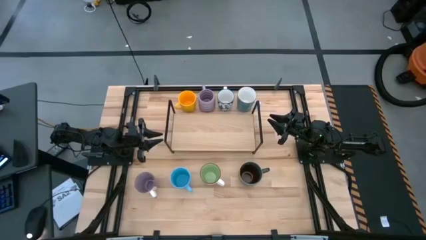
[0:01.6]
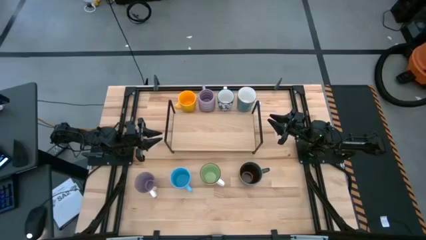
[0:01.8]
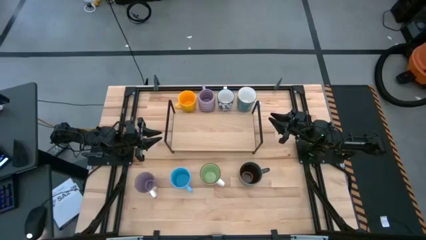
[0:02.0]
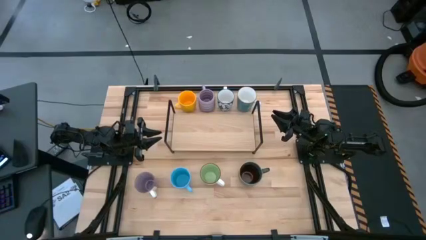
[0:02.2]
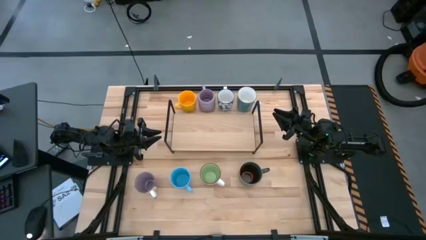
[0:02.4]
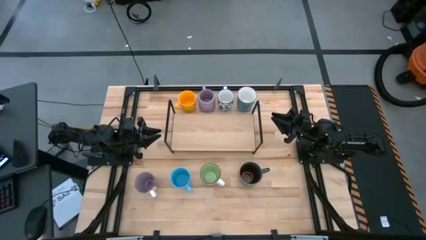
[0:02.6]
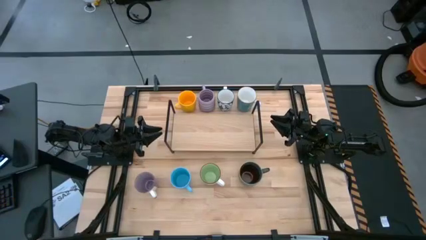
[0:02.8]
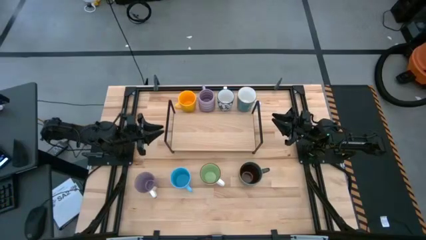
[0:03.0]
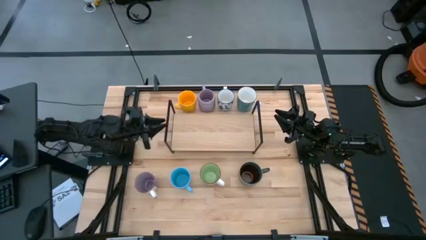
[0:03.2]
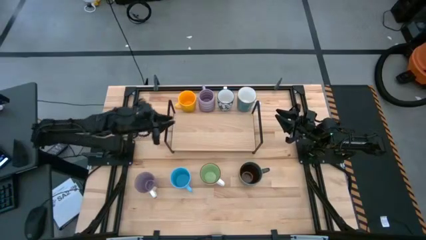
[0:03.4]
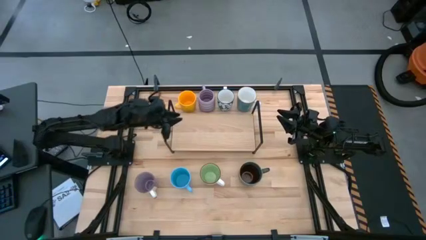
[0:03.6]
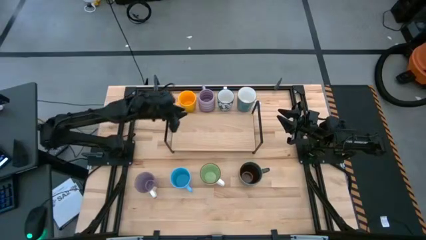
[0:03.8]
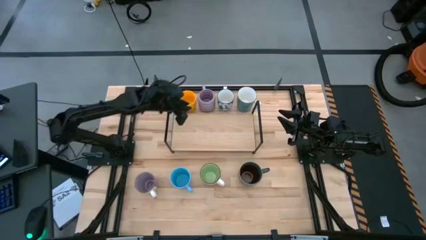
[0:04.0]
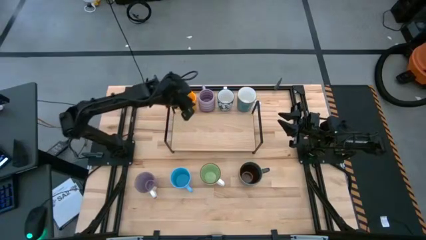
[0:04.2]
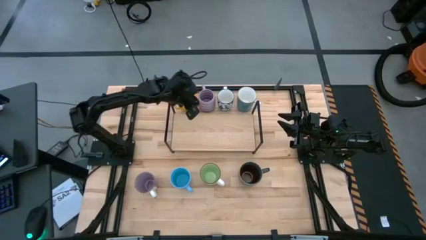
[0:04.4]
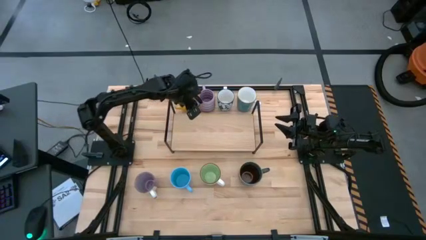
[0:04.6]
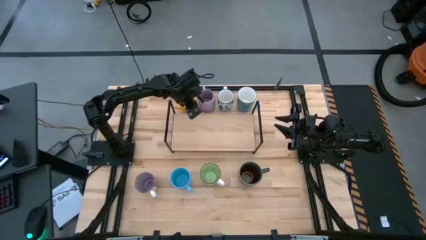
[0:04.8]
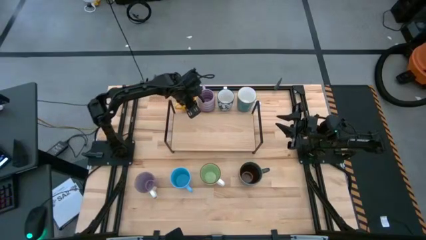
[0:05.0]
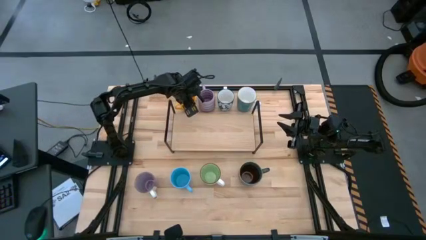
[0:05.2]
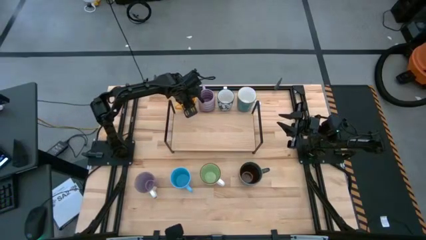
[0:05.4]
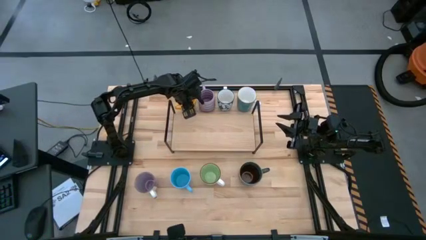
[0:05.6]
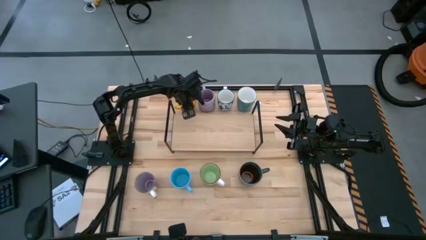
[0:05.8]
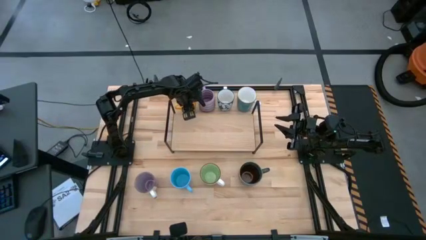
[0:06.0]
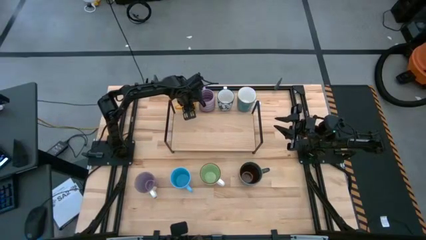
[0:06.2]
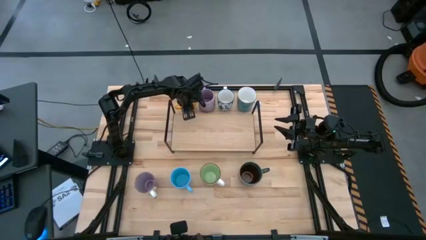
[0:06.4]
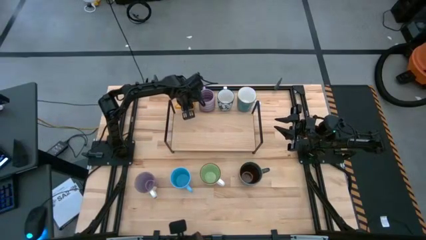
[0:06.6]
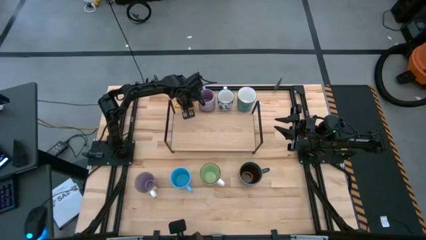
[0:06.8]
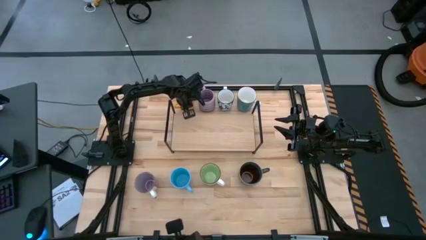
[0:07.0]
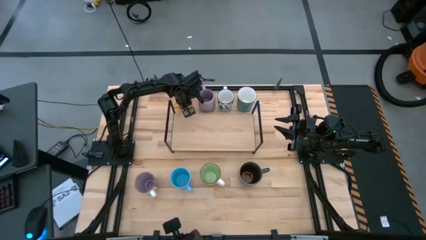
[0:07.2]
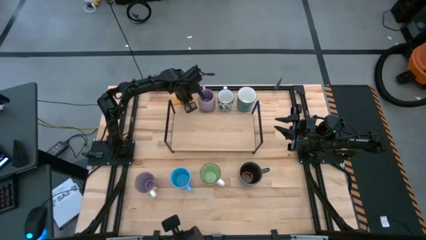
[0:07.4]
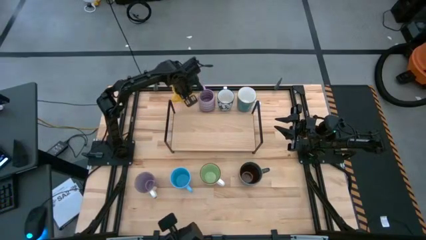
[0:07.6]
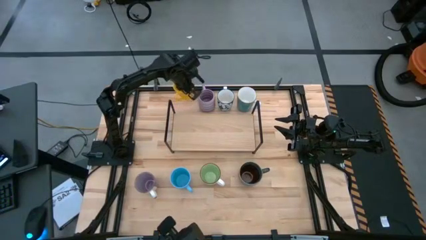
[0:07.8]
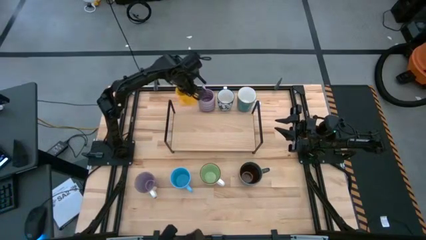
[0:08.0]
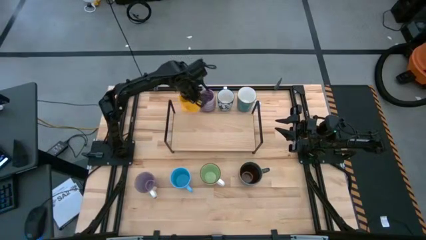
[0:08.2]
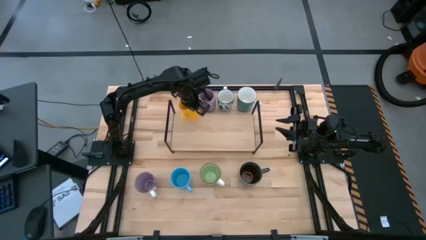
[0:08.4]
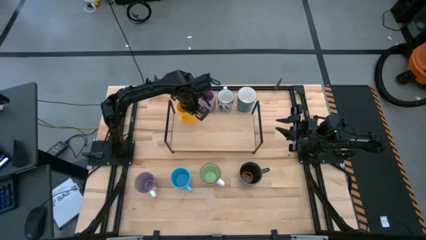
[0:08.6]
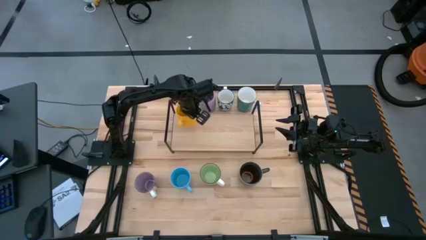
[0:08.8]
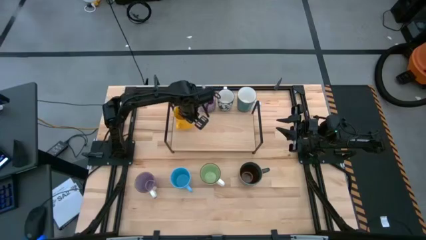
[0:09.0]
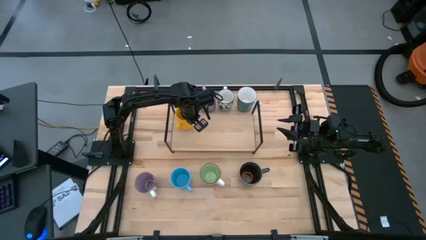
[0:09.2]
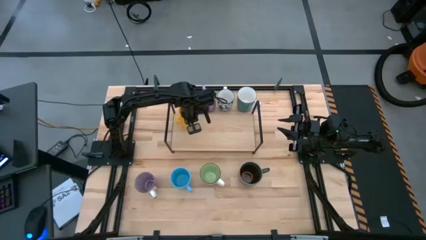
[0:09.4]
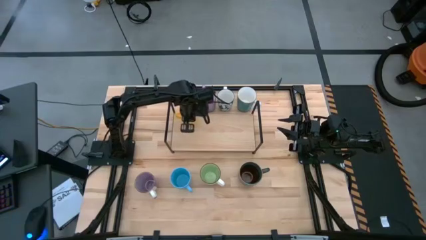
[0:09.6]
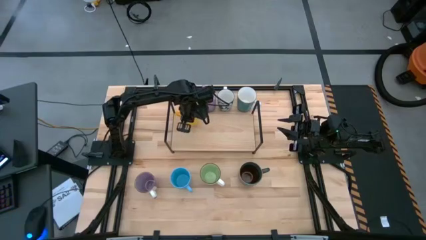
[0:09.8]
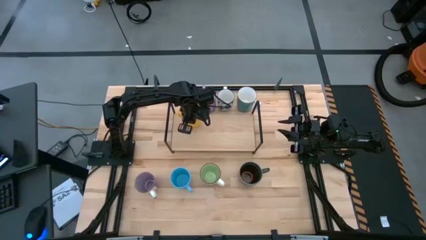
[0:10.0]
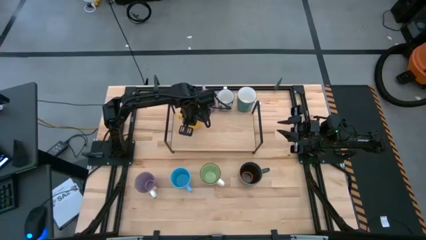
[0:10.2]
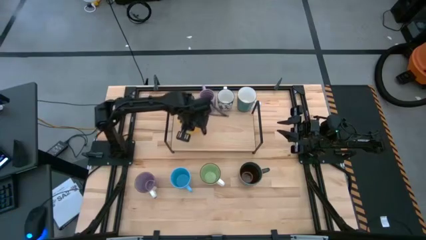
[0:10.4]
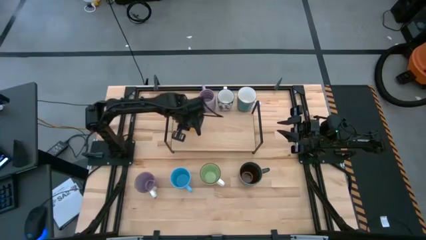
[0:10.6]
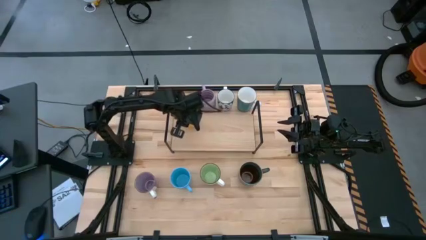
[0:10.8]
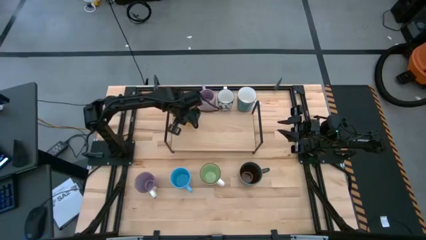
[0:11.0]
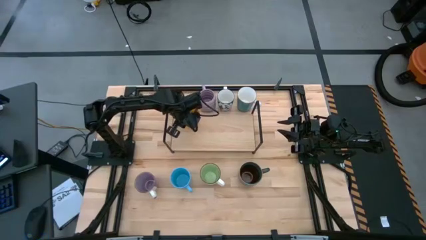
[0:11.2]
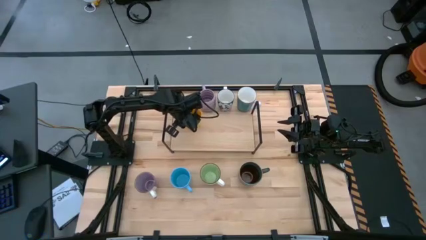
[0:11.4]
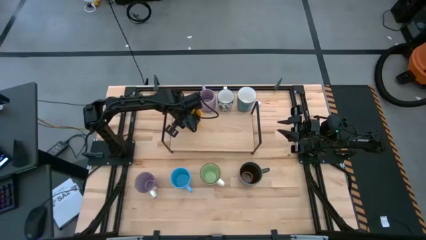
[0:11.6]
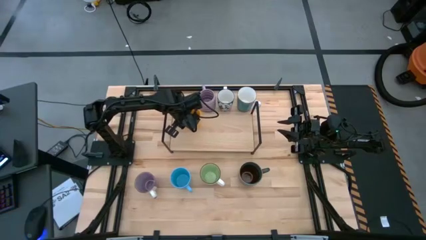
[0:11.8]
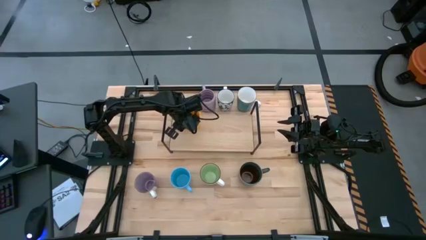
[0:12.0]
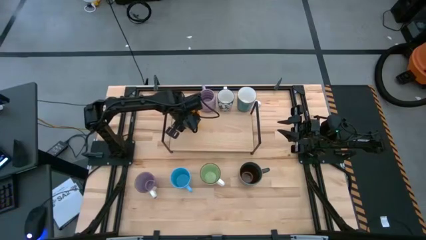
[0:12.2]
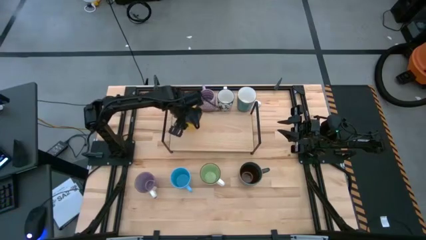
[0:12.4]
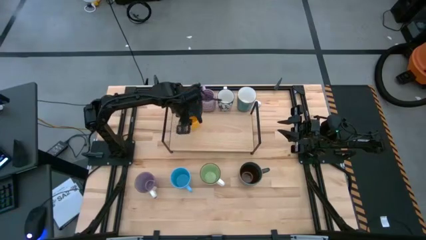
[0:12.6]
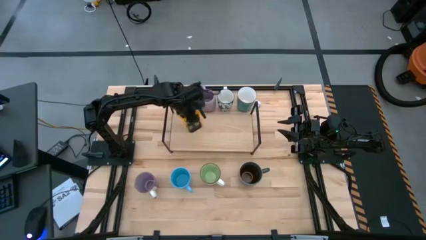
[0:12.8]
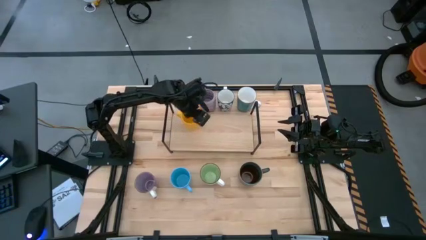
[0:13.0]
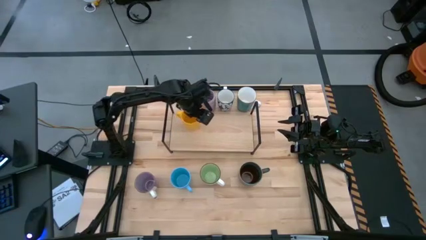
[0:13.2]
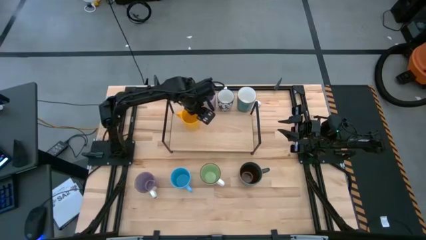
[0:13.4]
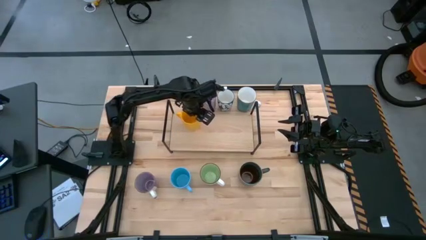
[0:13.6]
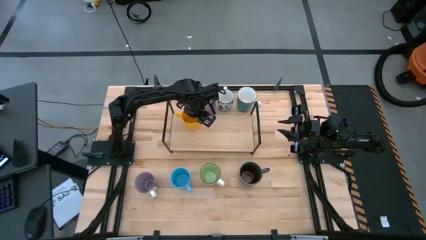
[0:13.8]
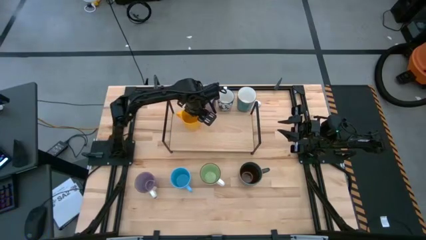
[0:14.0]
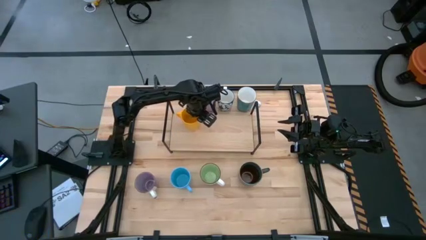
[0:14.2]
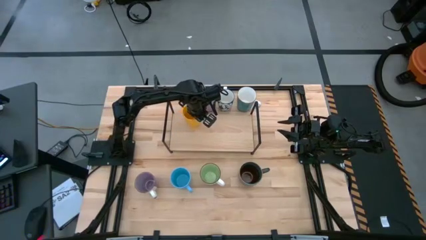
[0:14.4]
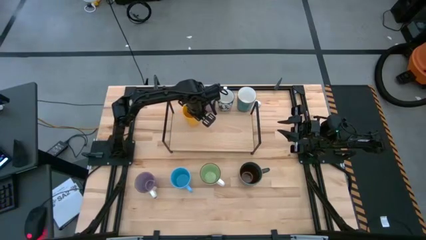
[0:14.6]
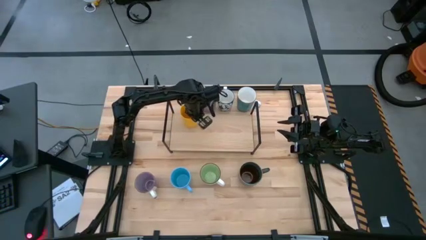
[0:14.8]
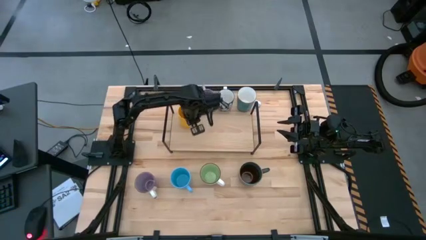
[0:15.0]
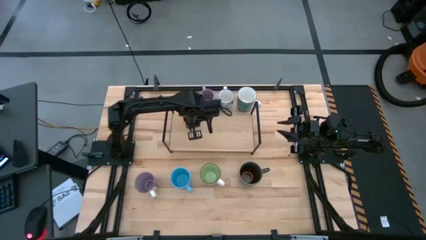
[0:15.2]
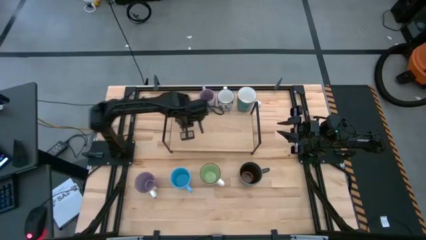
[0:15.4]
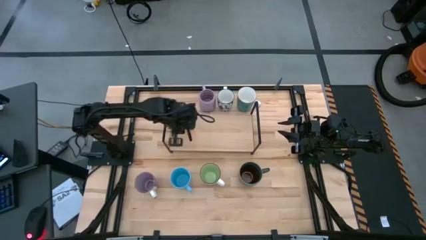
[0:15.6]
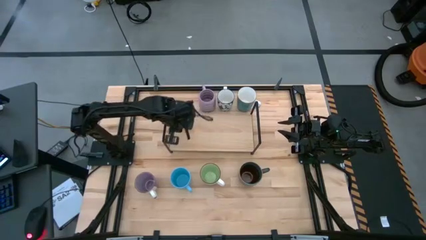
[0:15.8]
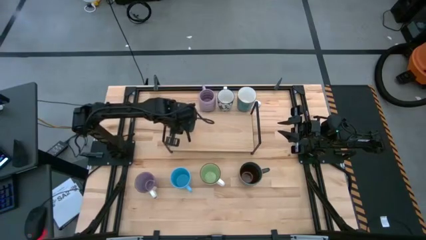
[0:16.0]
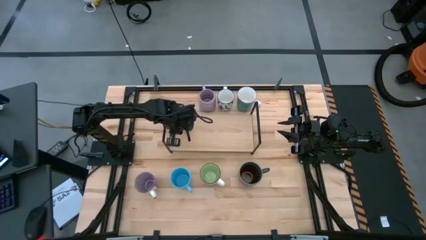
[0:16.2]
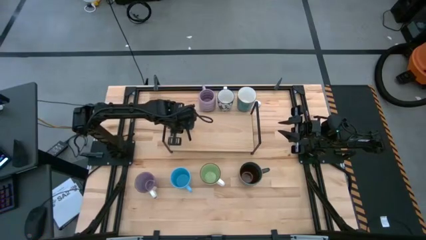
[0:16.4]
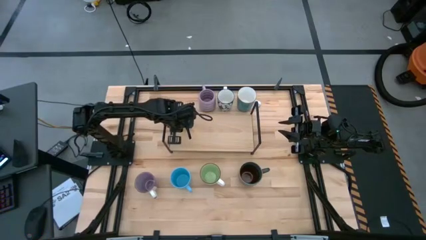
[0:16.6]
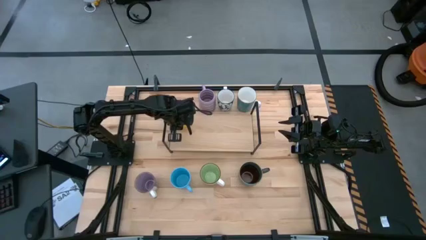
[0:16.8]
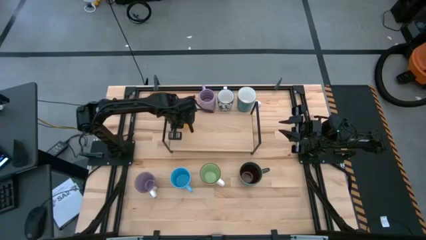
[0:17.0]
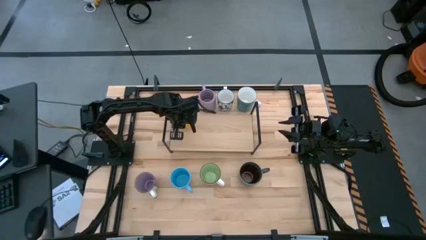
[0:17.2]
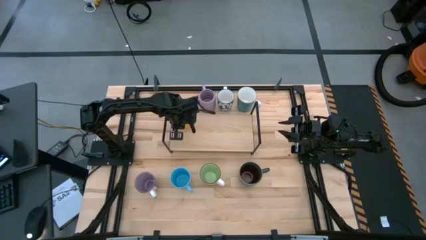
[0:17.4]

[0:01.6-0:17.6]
Task: Place coffee mugs
Put the yellow mug on the shelf
